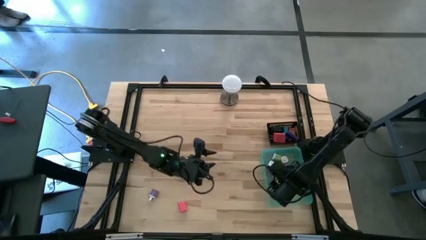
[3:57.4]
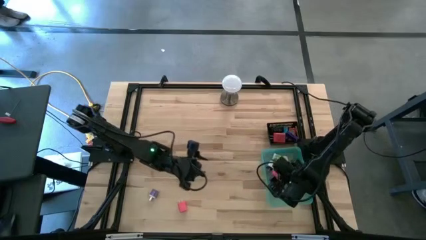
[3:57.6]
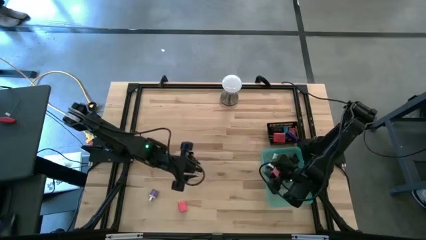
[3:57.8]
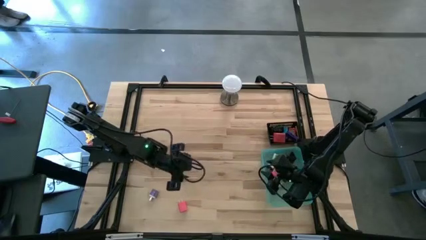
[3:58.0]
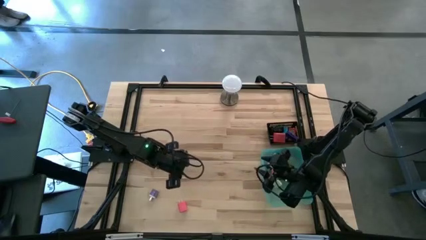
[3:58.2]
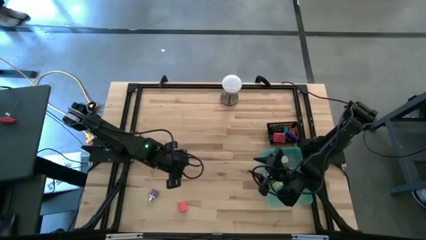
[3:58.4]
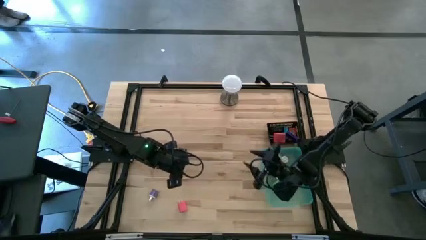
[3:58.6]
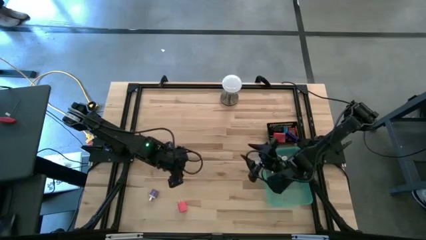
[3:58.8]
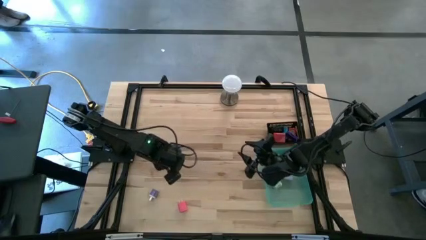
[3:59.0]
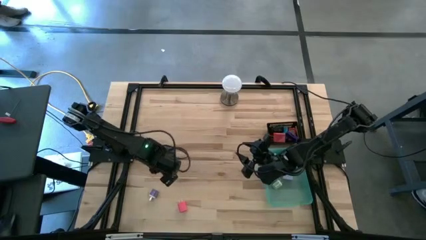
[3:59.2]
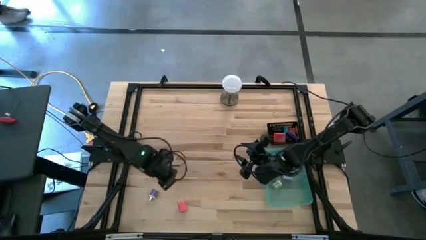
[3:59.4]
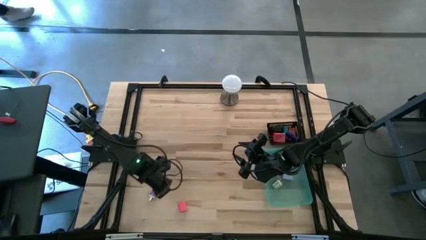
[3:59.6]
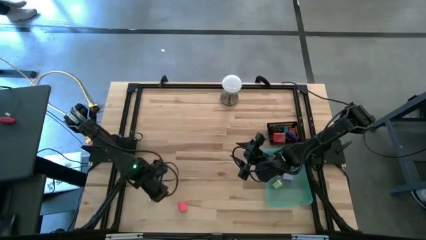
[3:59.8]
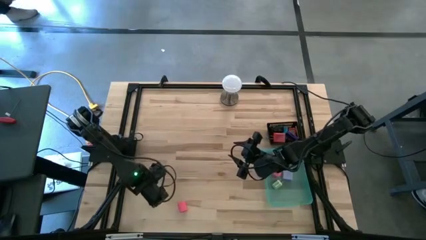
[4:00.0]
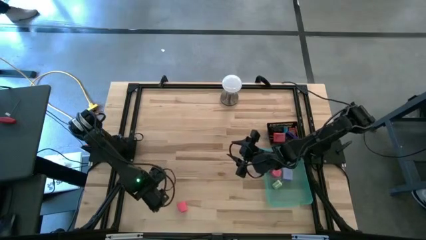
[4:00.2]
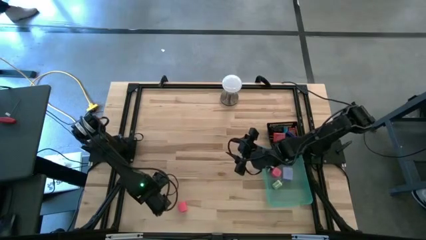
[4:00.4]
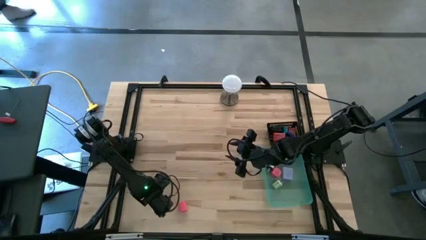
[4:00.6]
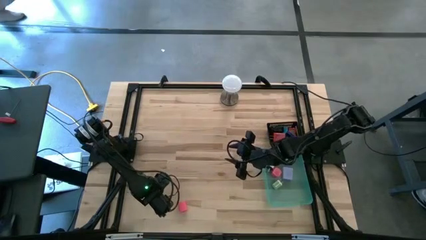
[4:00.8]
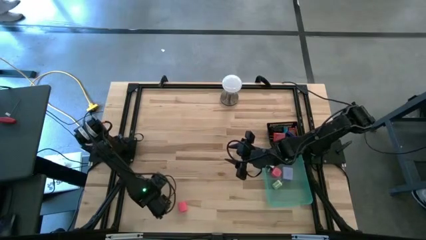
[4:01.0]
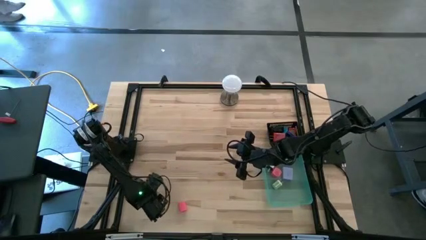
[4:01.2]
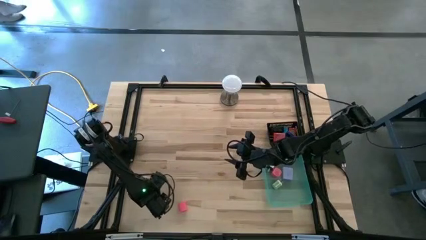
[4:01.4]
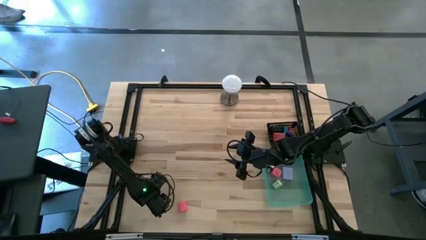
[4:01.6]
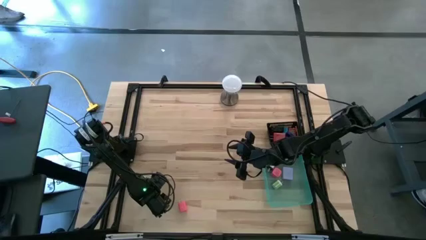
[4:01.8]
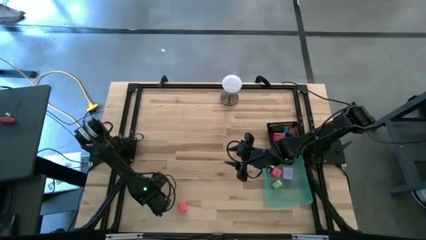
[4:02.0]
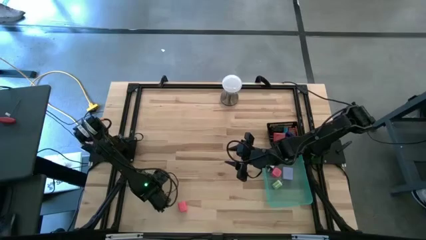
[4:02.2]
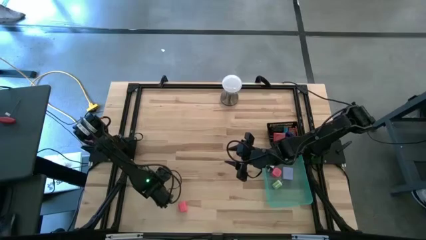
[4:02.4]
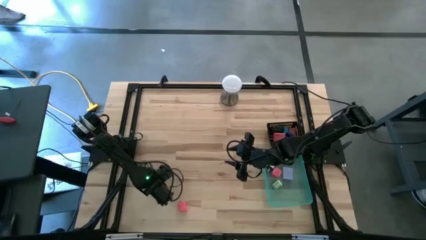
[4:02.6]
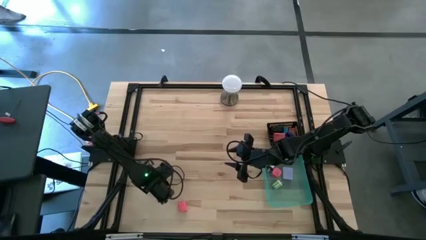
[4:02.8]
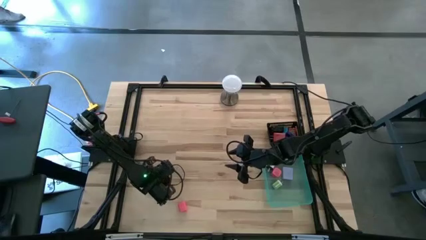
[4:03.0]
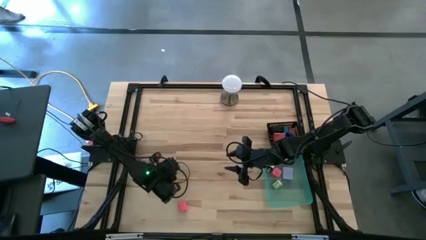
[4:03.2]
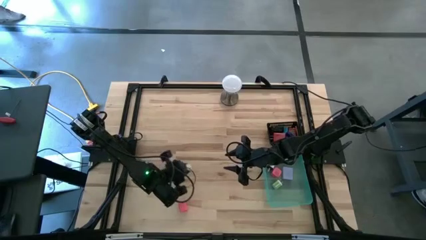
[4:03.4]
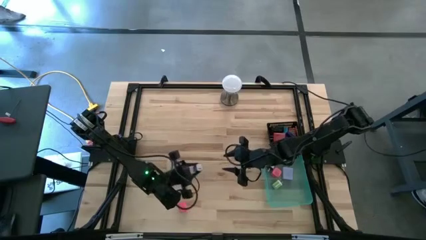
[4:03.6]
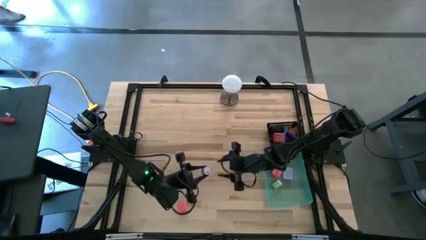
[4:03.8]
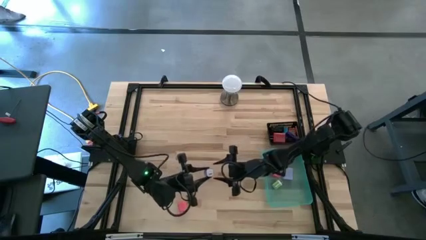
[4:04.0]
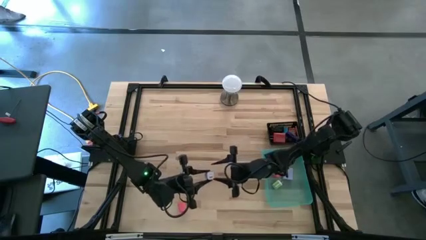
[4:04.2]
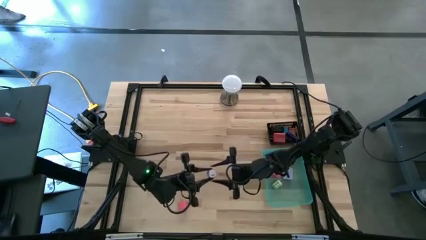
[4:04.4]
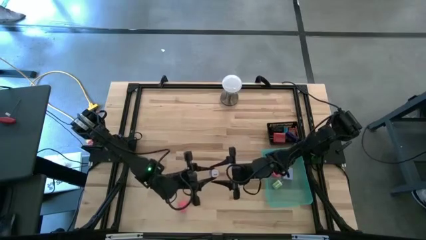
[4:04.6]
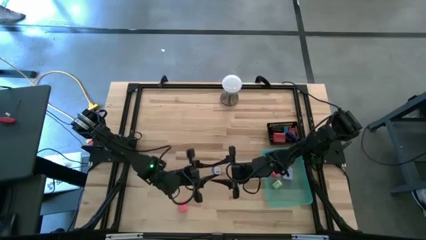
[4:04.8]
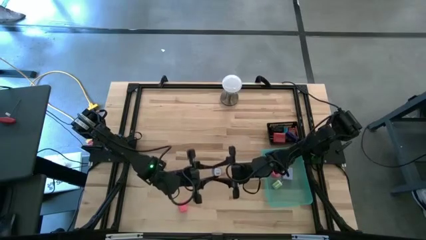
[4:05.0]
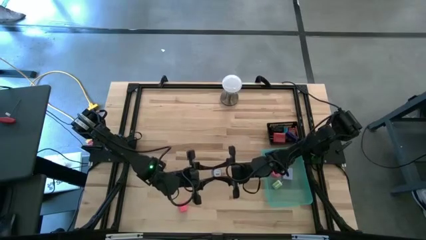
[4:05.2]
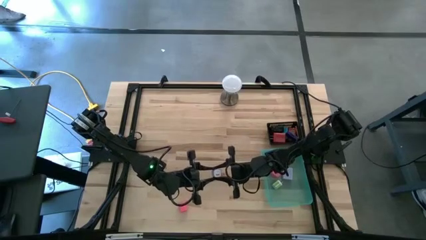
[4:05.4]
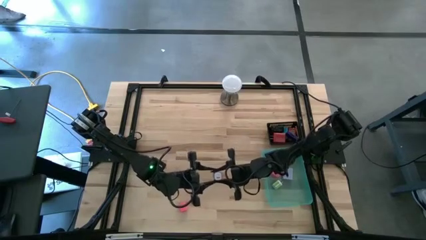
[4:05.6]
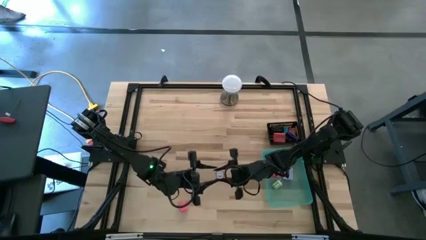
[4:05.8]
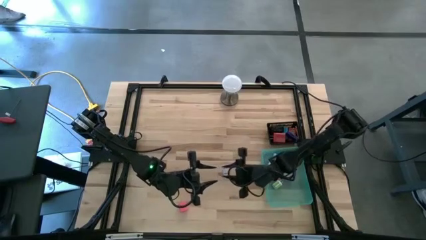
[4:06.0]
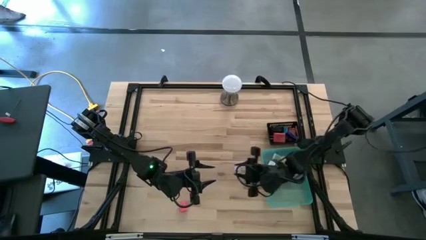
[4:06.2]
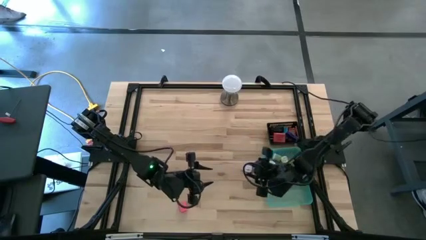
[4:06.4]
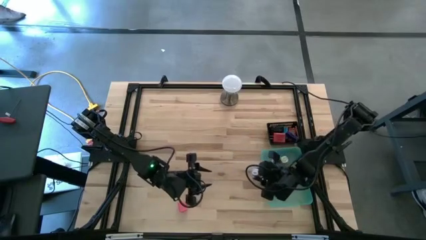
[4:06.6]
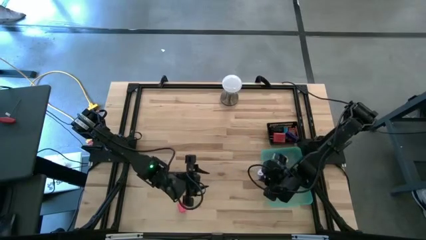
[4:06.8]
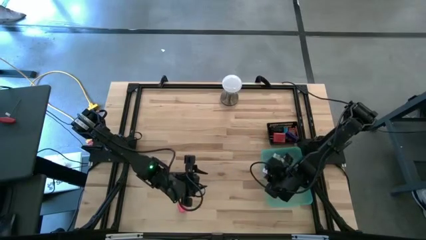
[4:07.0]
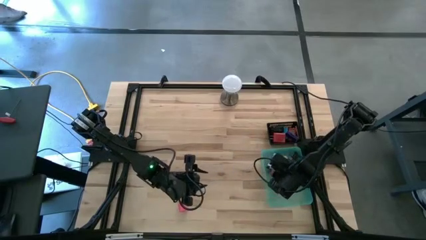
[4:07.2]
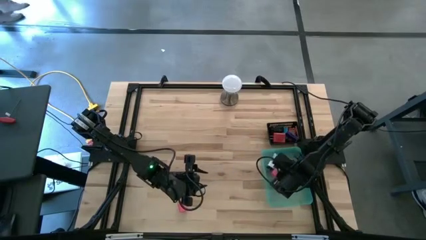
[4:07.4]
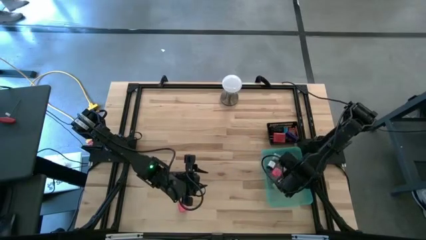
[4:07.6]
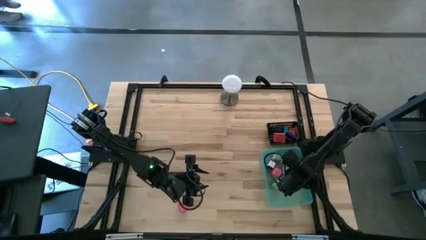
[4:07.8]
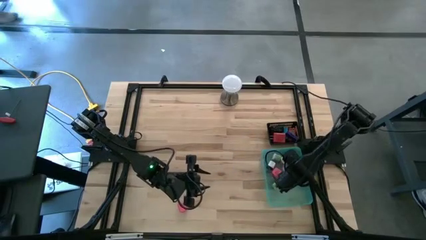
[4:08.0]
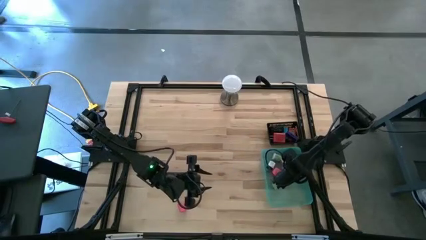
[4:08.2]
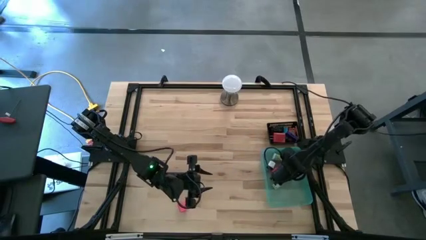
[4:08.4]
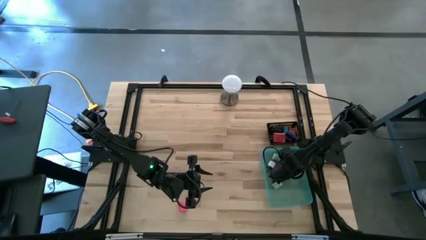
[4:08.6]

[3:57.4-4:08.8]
Task: Pick & Place Office items
Put the purple charger adapter into the green bin

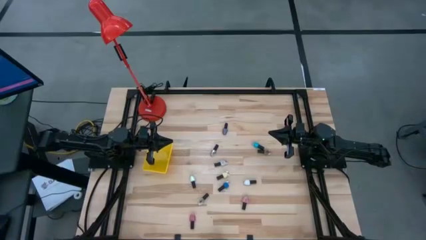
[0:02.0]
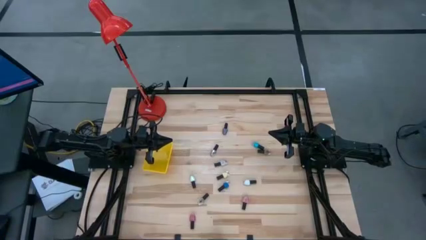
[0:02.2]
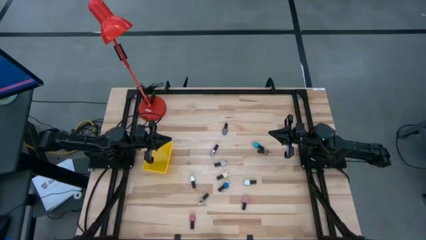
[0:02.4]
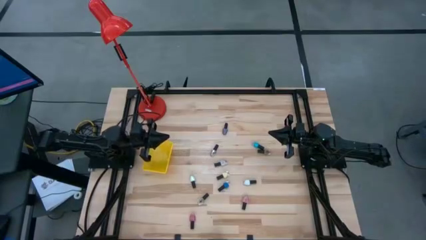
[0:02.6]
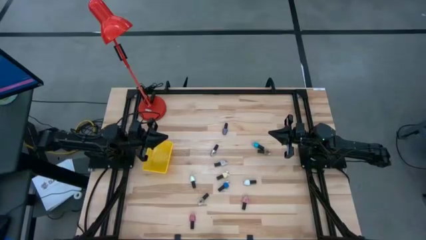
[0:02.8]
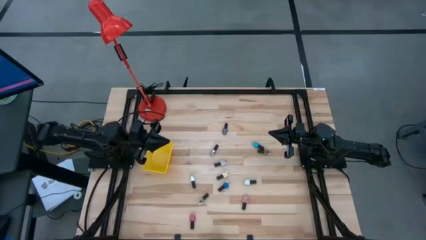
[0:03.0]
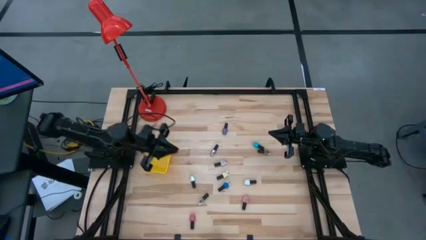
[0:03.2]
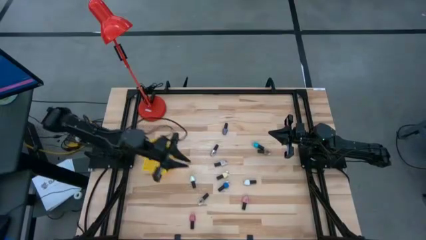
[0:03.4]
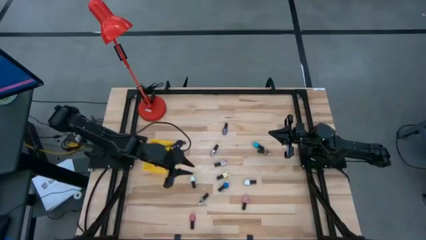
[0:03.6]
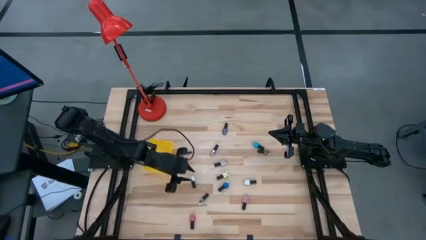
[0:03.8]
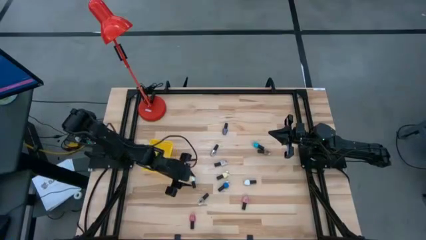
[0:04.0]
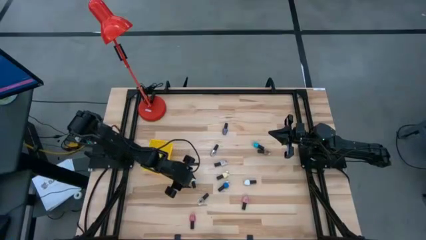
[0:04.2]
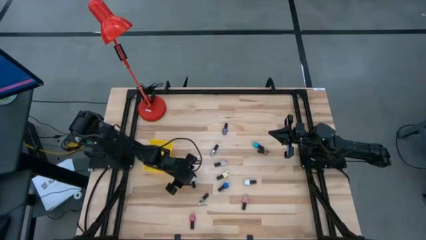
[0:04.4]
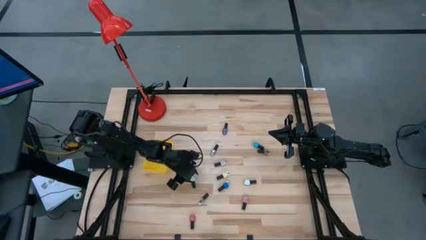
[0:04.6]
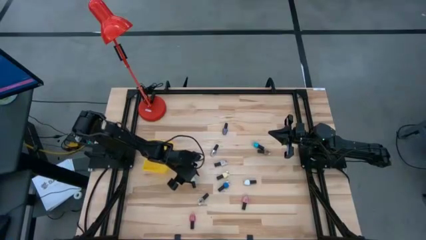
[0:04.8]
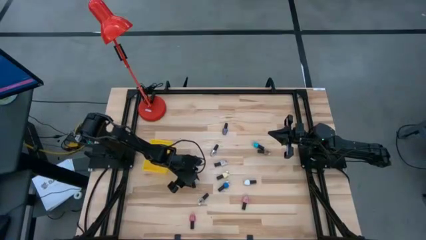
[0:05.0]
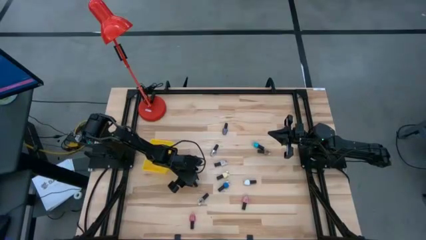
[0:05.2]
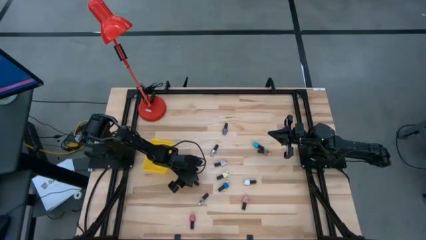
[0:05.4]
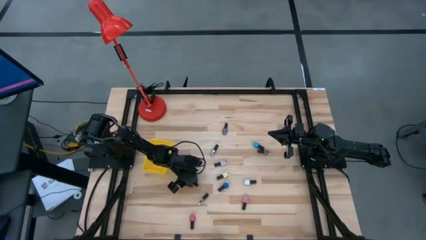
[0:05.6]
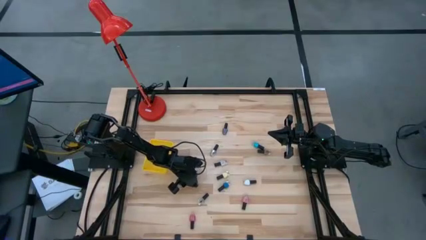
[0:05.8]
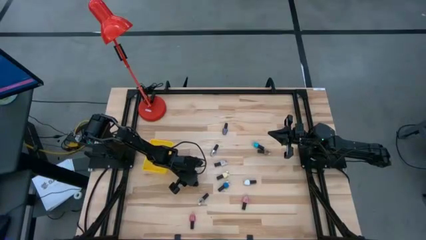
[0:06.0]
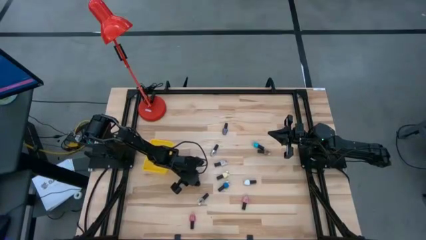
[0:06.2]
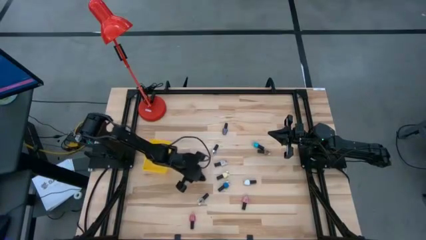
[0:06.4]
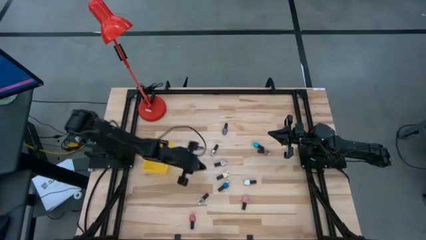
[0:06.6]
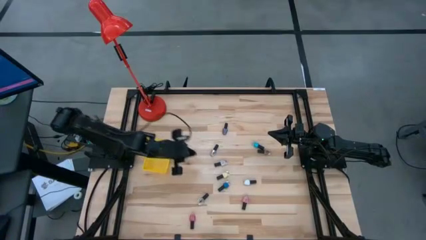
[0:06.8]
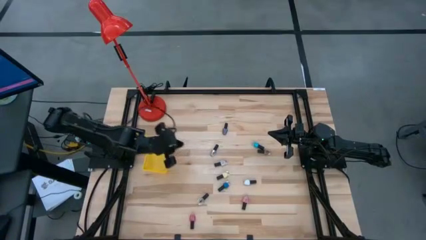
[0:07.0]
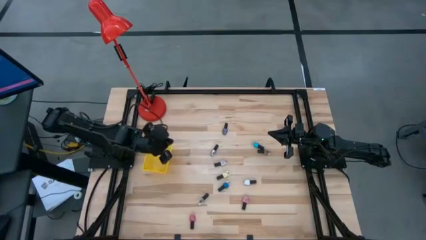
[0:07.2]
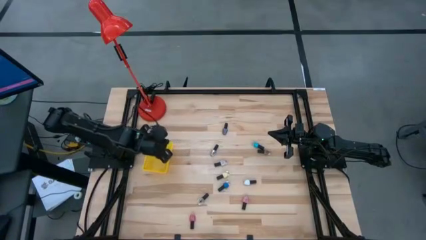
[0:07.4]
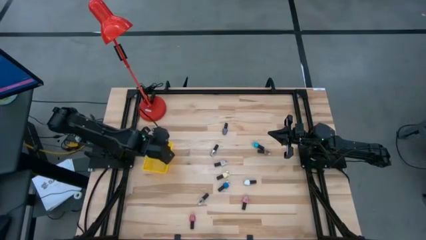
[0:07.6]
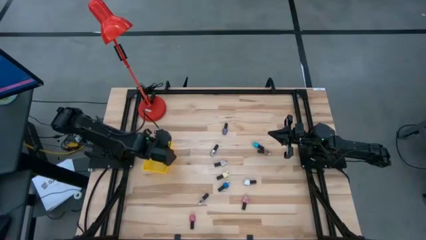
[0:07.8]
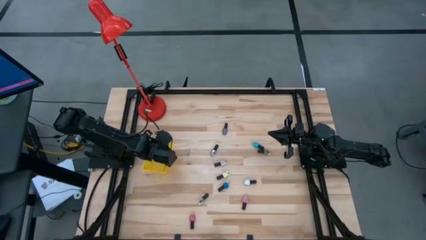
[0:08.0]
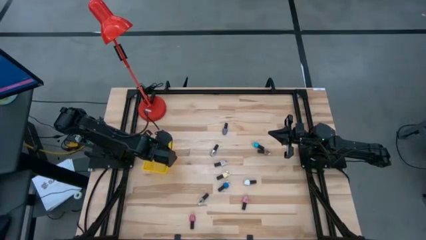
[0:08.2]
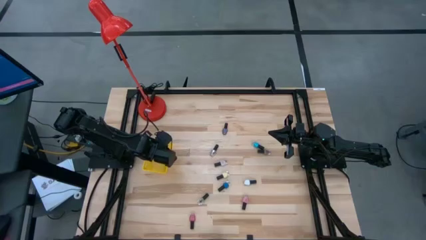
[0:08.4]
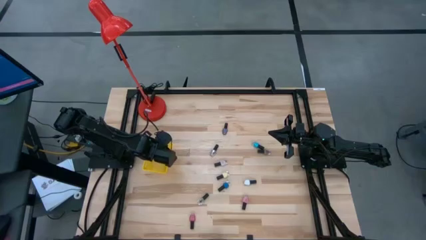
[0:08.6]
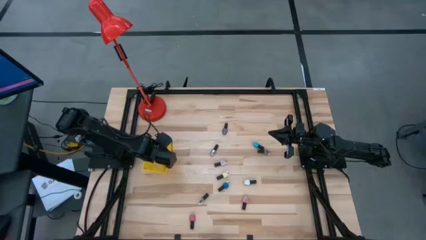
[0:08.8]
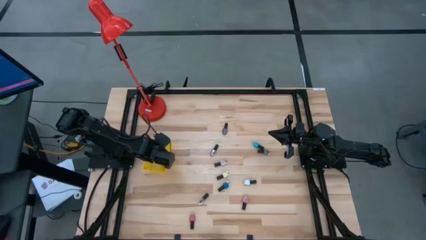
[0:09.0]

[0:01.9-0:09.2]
Task: Pick & Place Nail Polish
Put the light green nail polish bottle into the yellow basket
